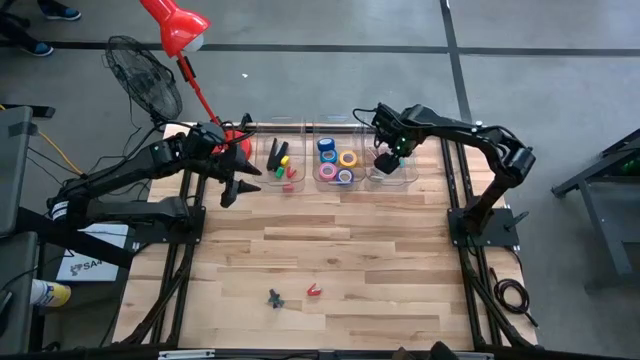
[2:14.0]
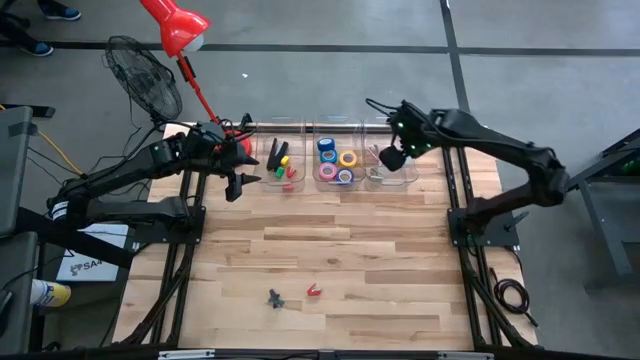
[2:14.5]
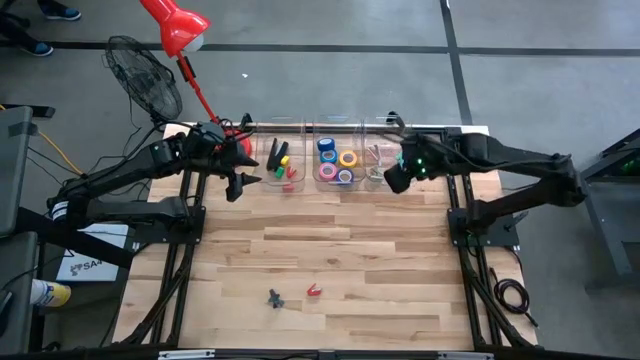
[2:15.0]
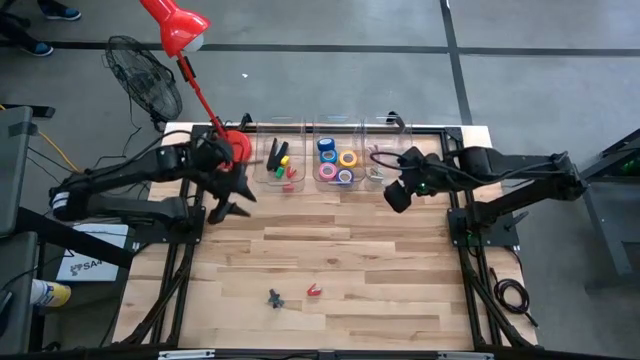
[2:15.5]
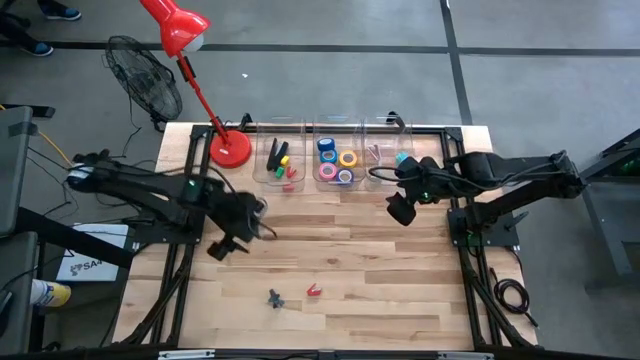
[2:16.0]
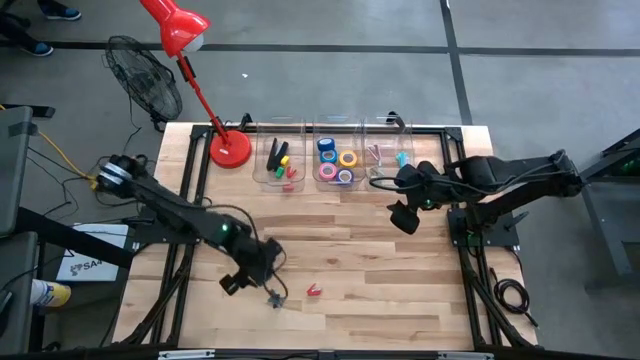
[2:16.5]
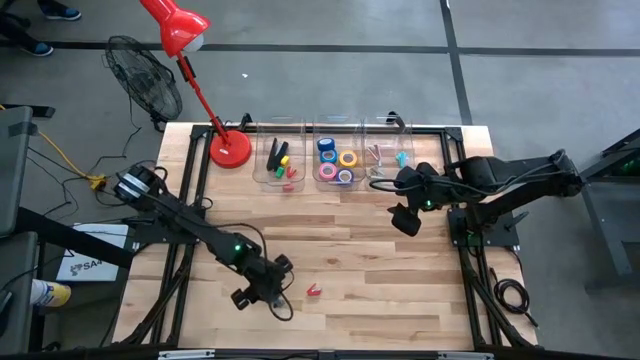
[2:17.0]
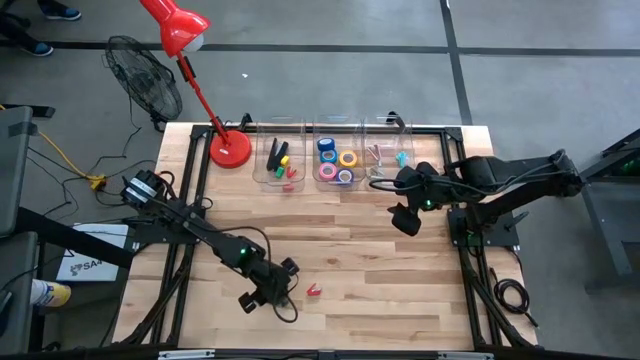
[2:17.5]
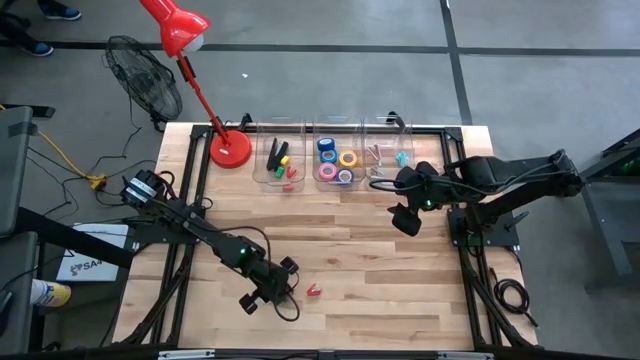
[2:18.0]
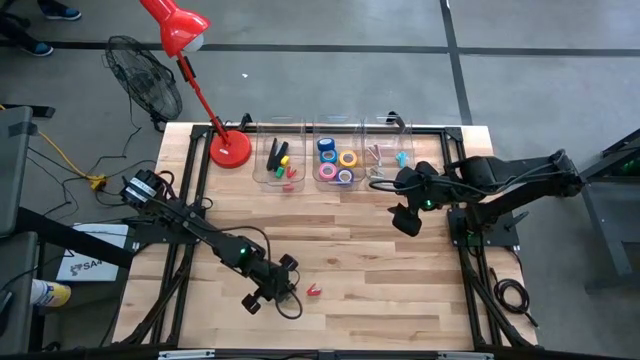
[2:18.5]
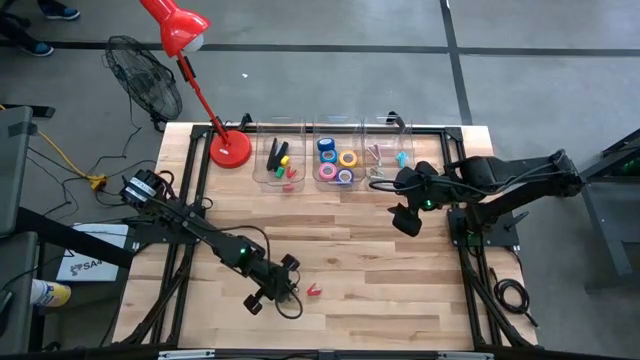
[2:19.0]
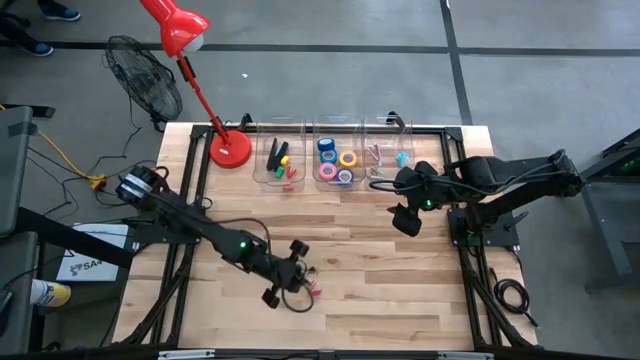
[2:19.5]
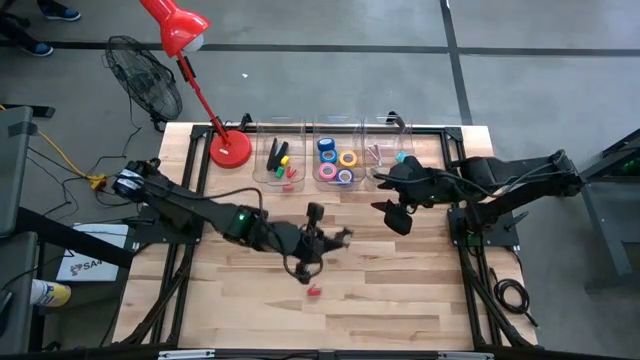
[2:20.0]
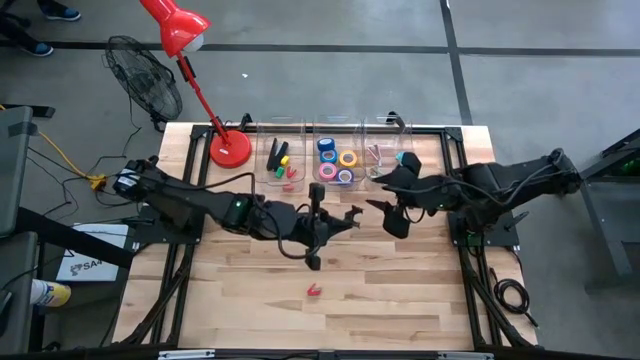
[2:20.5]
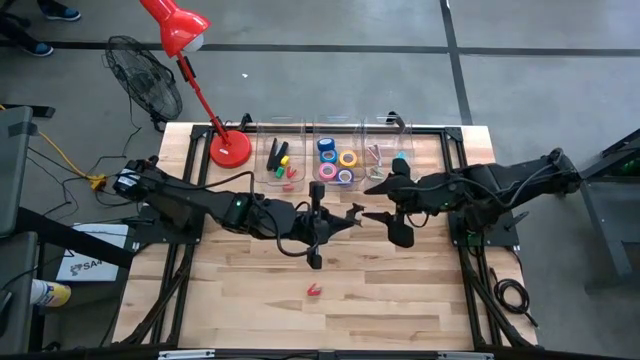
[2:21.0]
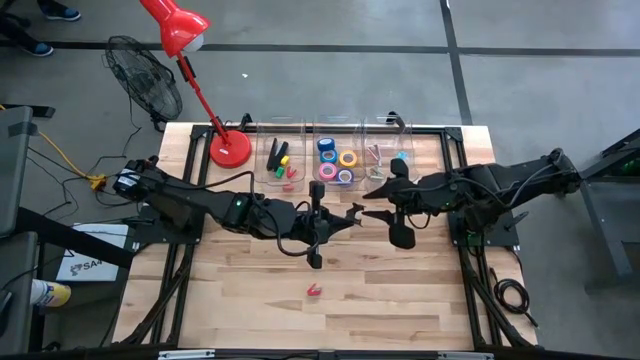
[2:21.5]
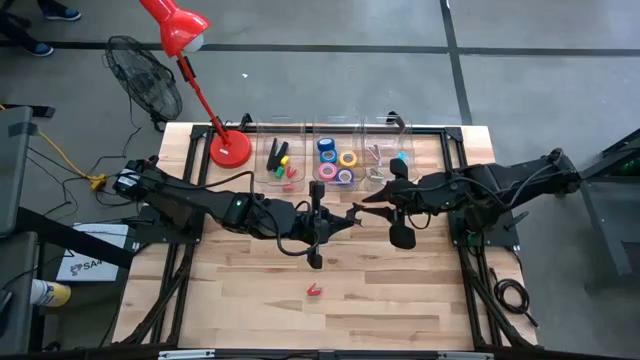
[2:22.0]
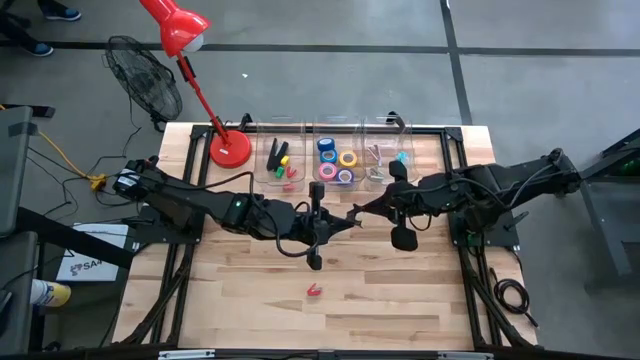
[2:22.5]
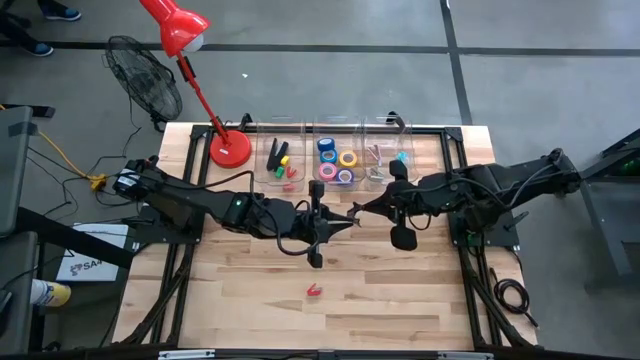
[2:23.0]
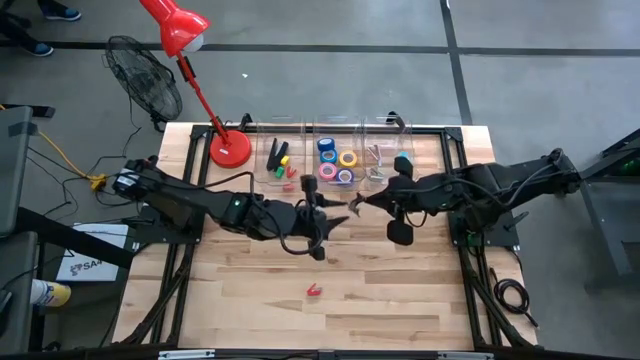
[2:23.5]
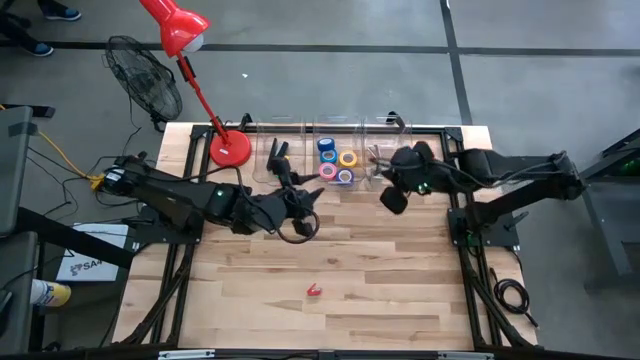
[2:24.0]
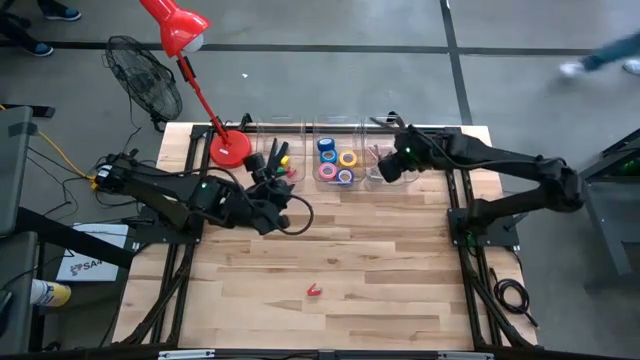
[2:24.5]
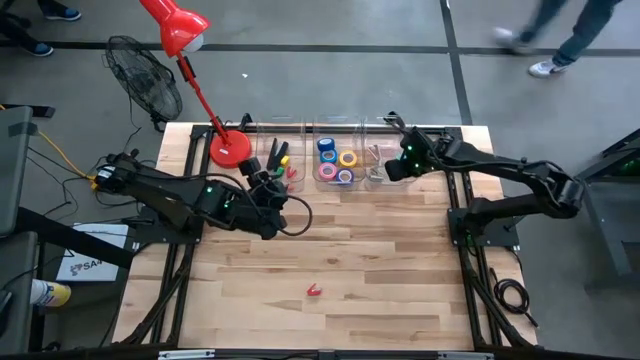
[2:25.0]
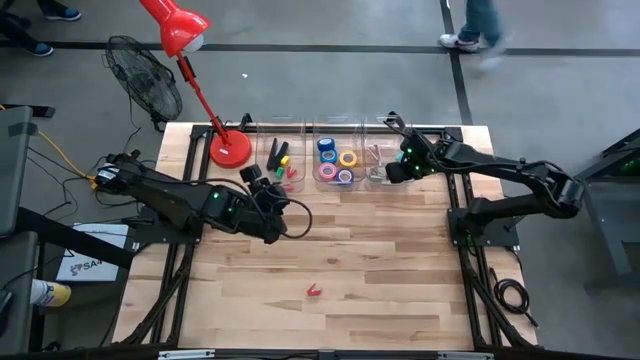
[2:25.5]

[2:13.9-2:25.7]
Task: Pick and place Stapler, Stapler remover, tape
Put the black staple remover into the right transparent bin

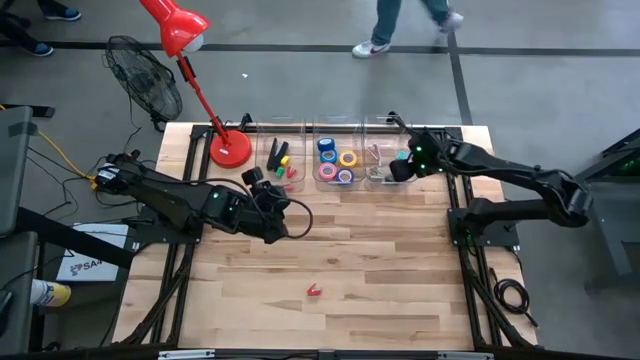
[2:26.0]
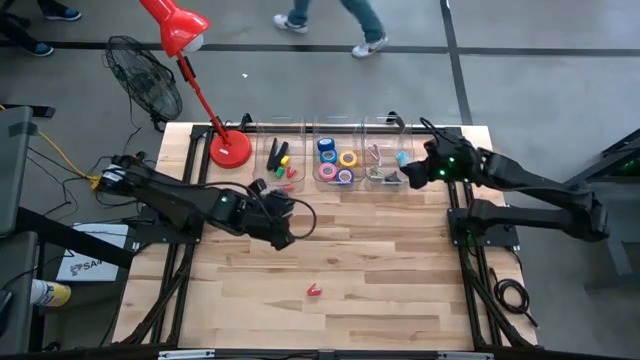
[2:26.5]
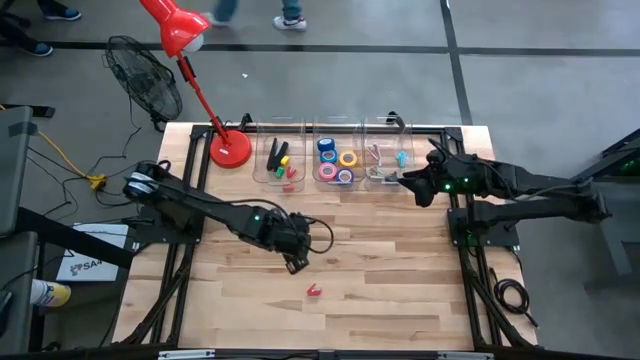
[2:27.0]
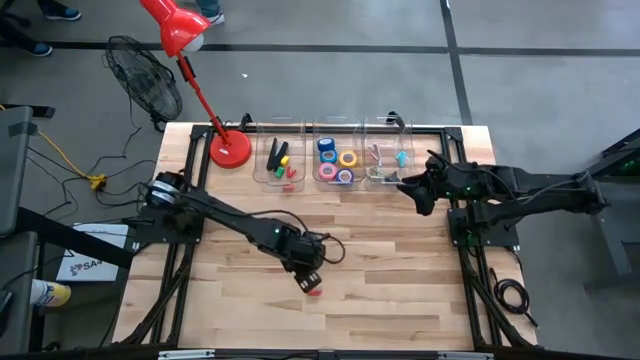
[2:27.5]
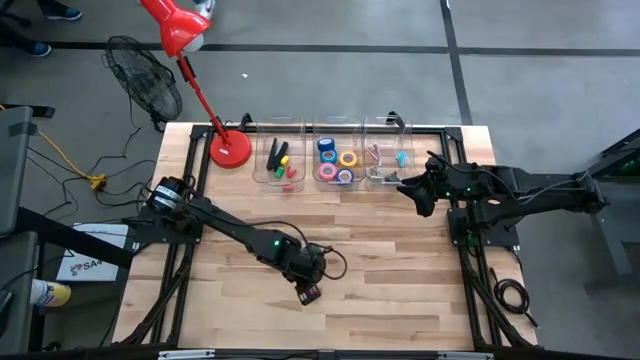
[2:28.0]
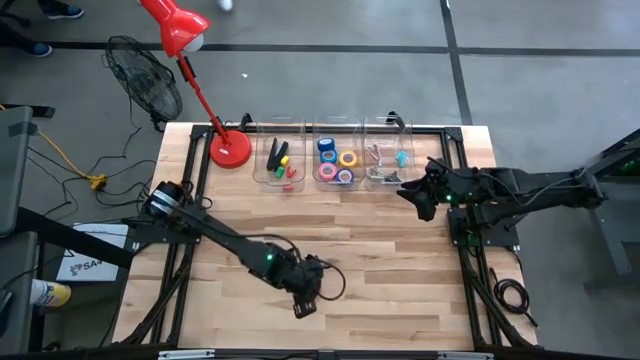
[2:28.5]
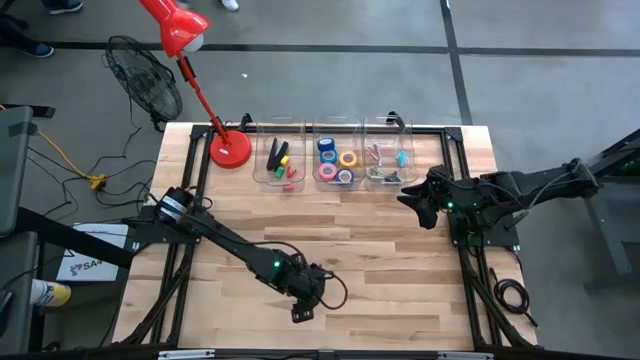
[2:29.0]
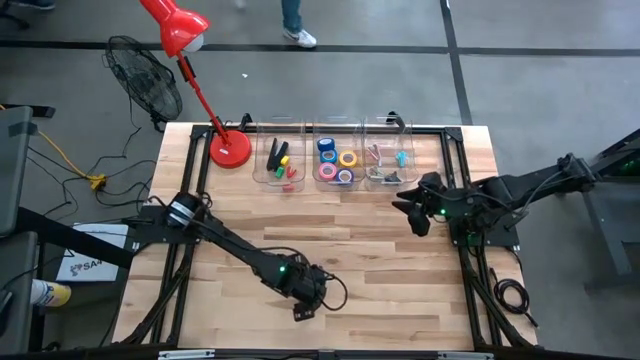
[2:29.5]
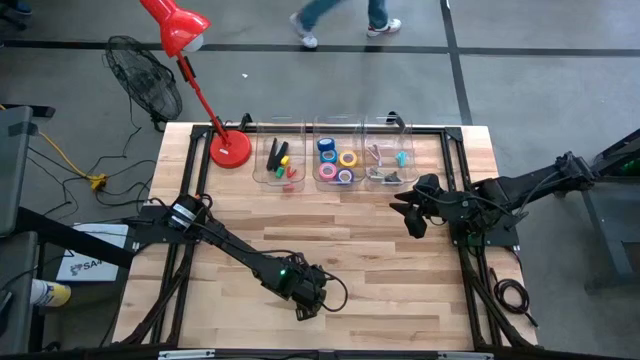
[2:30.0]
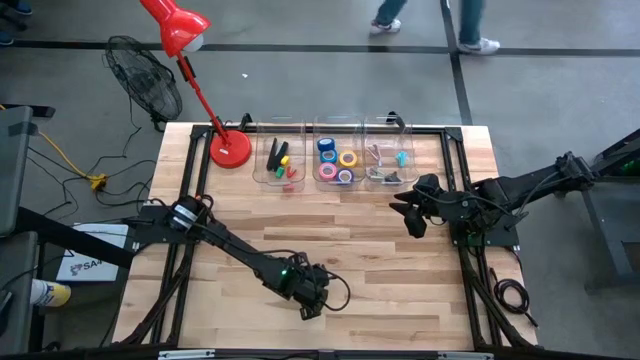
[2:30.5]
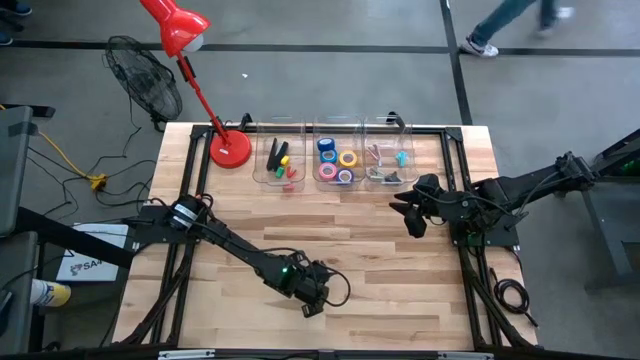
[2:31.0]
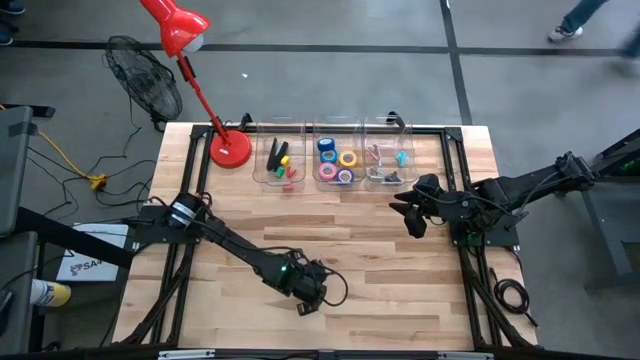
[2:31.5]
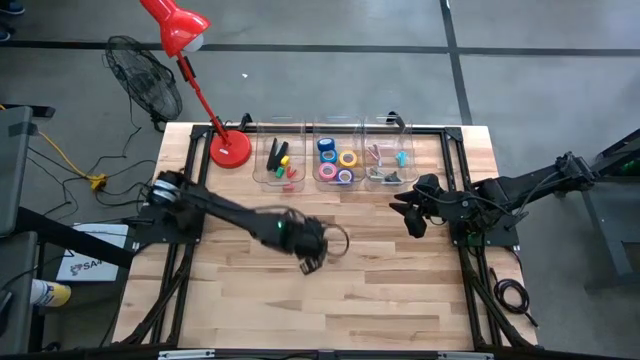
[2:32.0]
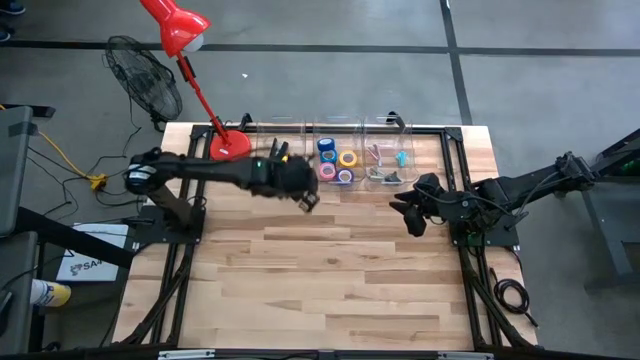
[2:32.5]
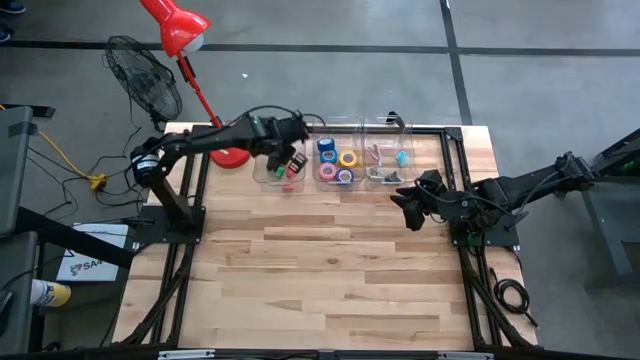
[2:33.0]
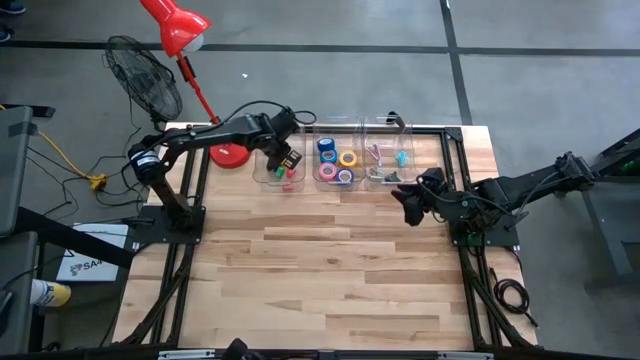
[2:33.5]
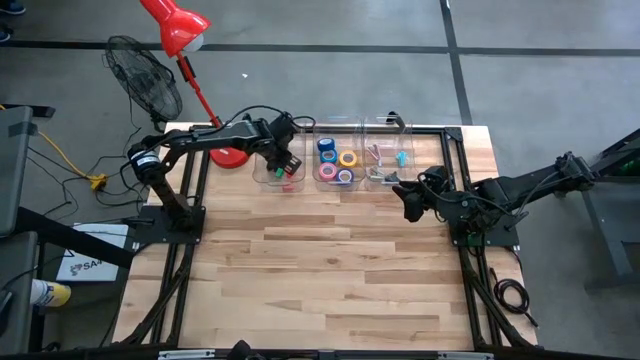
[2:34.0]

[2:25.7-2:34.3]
Put the red stapler into the left transparent bin

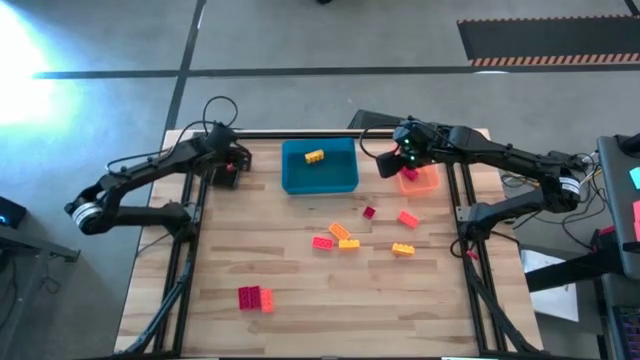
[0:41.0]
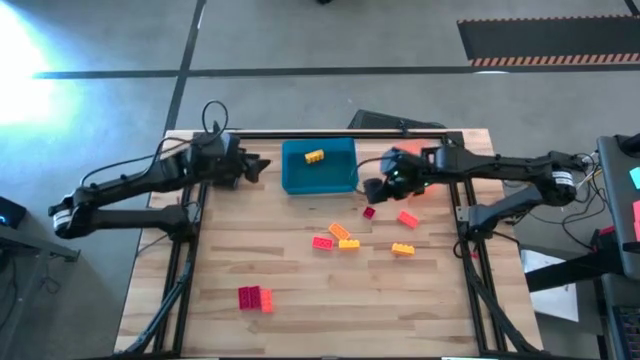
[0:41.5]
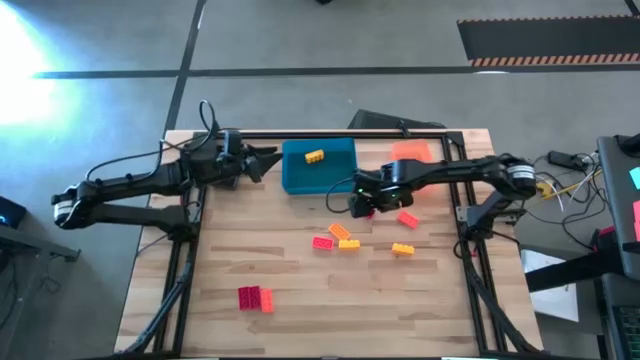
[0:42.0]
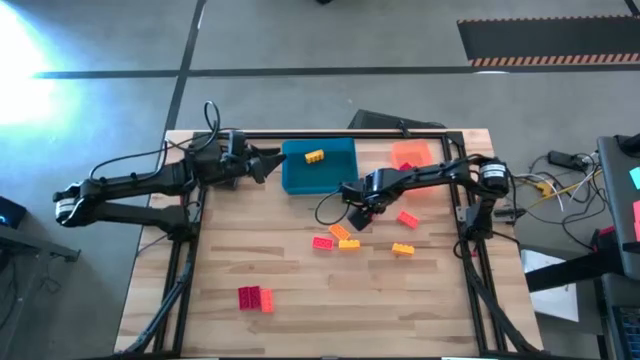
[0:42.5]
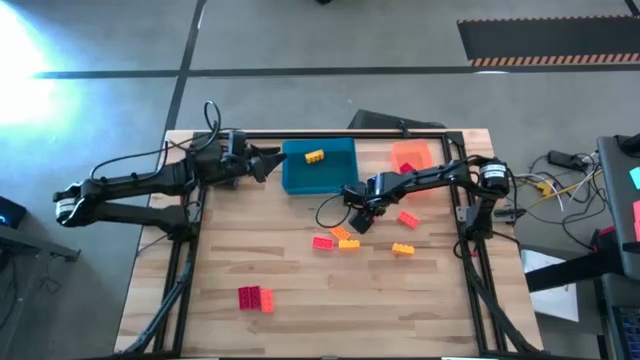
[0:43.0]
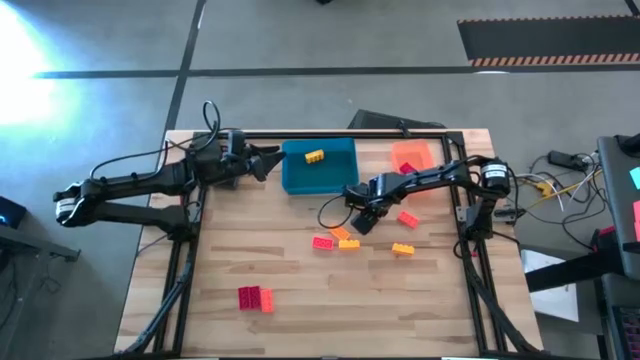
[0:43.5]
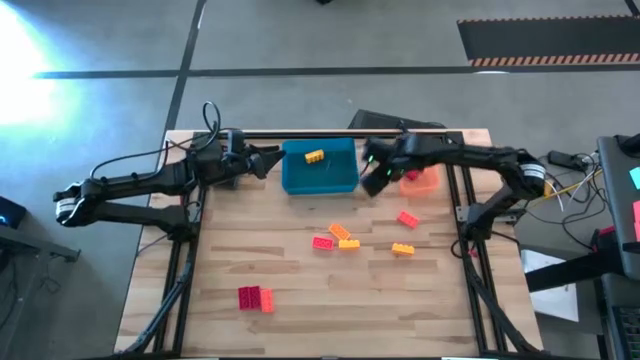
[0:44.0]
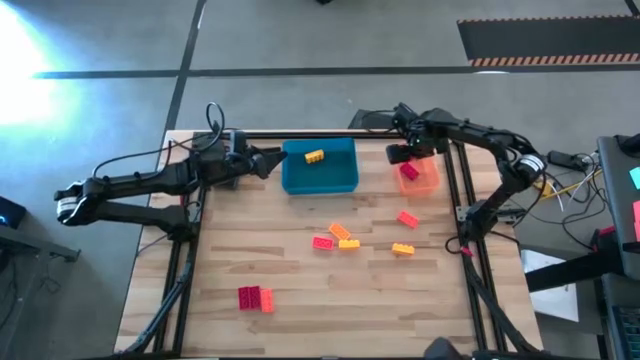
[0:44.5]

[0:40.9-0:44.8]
Task: Sort & place blocks by color
Put the red game piece into the orange bin
